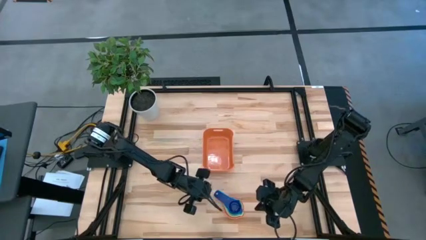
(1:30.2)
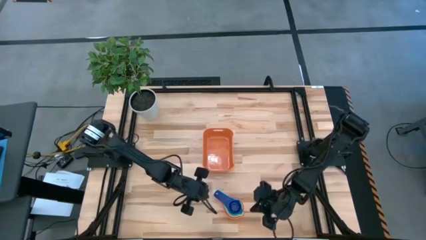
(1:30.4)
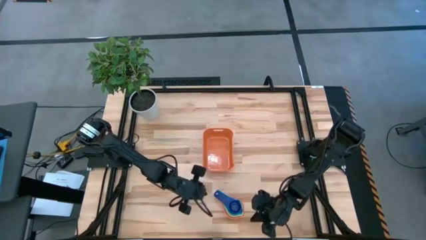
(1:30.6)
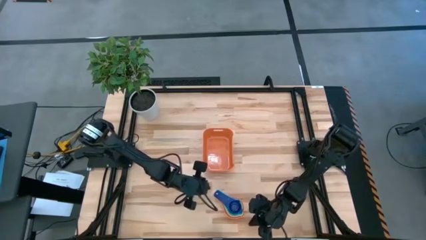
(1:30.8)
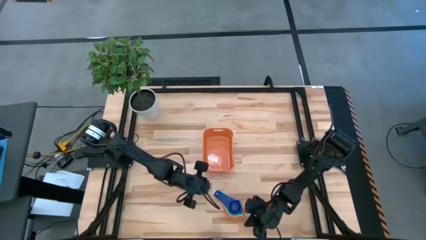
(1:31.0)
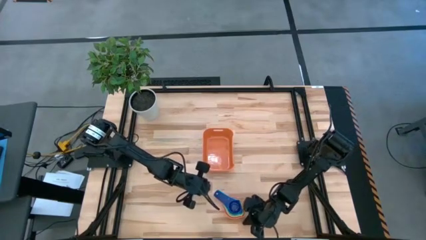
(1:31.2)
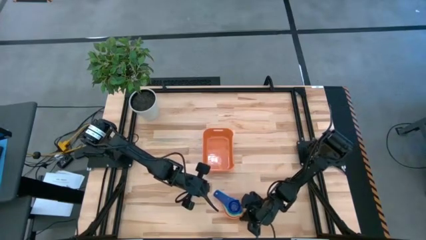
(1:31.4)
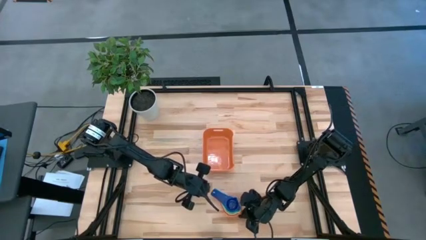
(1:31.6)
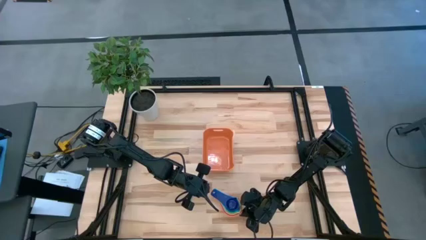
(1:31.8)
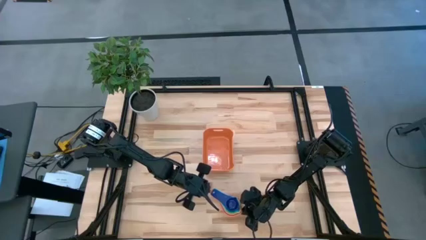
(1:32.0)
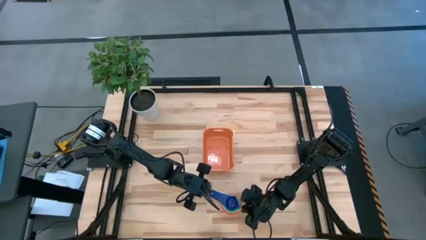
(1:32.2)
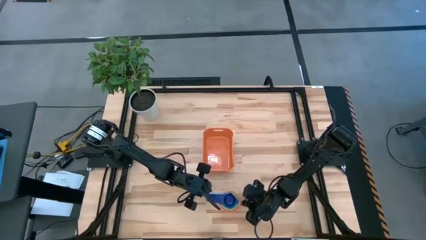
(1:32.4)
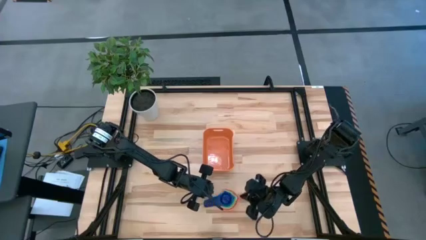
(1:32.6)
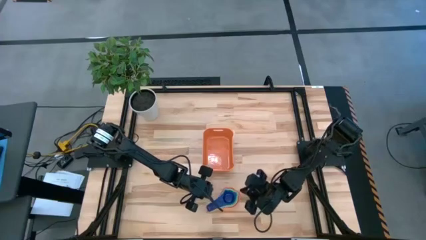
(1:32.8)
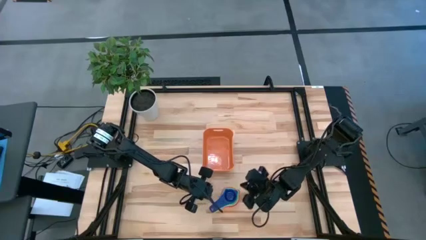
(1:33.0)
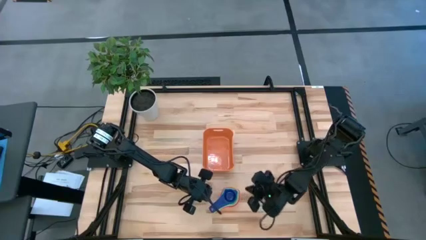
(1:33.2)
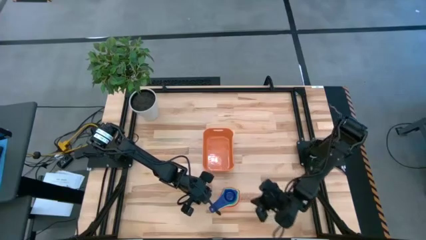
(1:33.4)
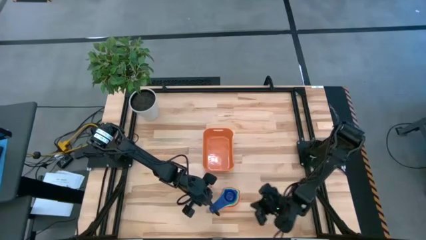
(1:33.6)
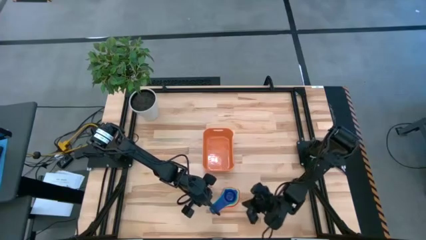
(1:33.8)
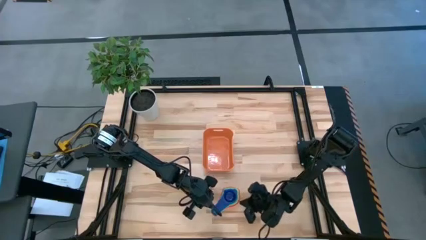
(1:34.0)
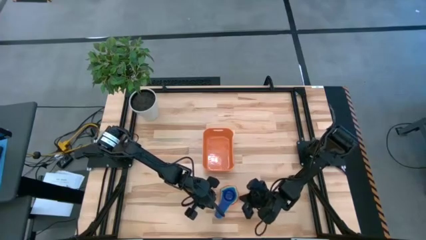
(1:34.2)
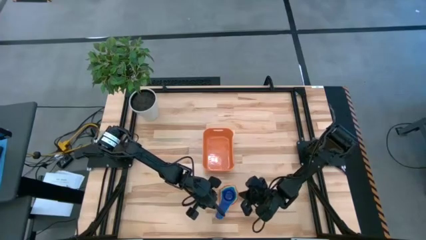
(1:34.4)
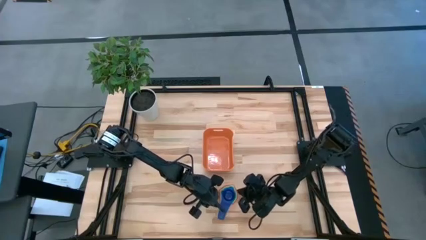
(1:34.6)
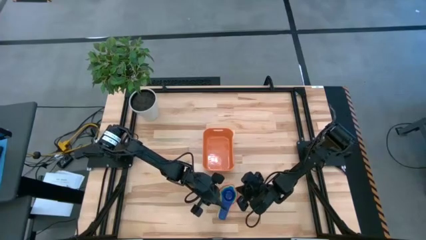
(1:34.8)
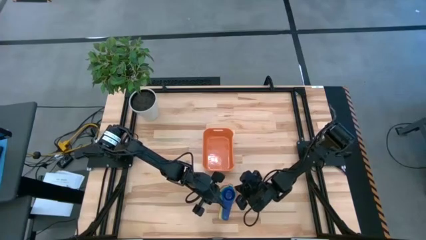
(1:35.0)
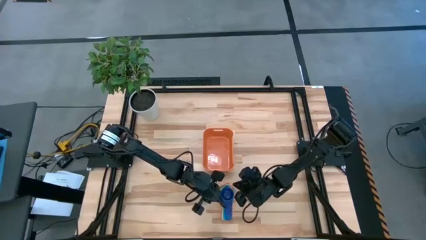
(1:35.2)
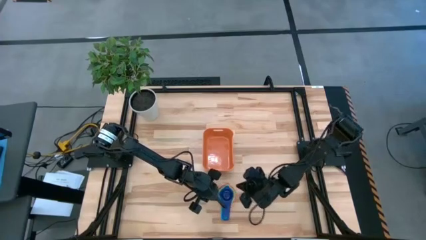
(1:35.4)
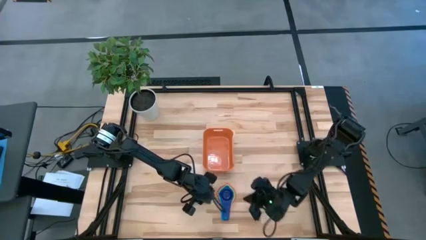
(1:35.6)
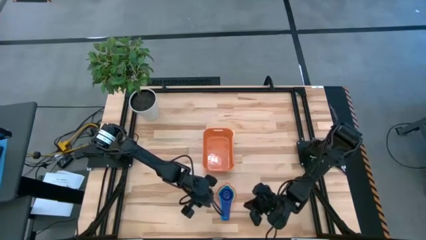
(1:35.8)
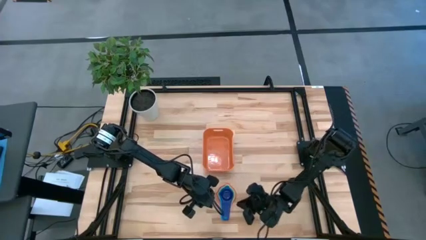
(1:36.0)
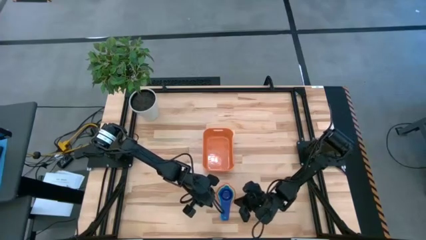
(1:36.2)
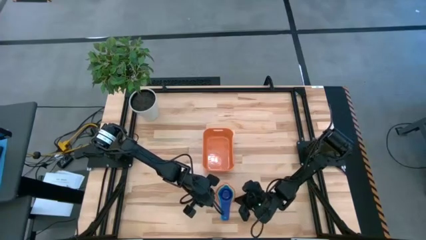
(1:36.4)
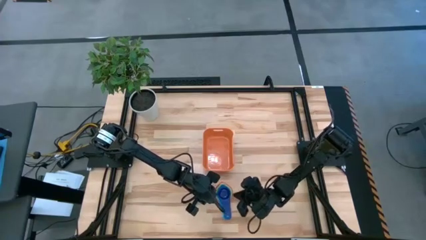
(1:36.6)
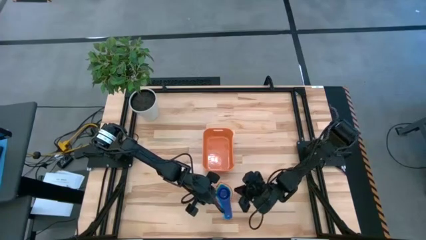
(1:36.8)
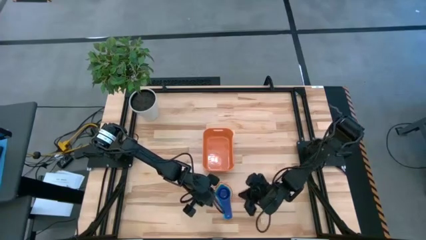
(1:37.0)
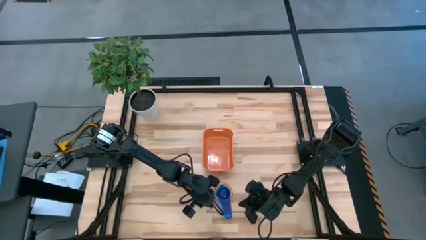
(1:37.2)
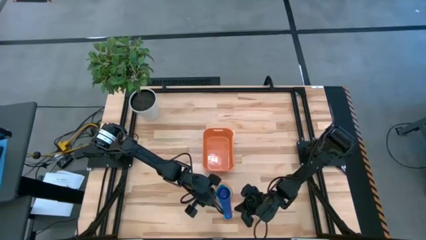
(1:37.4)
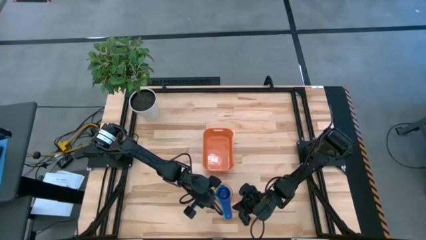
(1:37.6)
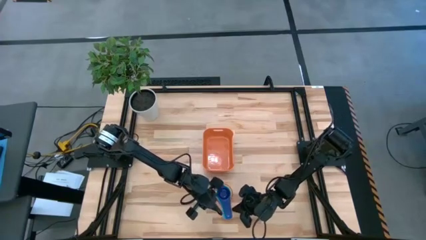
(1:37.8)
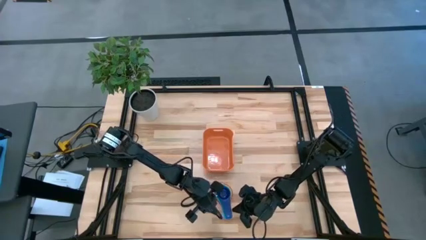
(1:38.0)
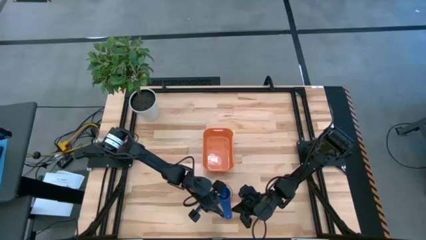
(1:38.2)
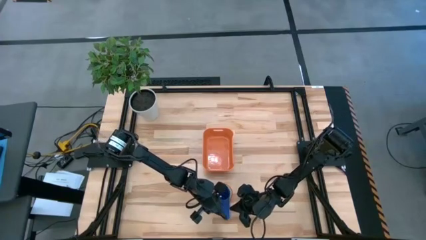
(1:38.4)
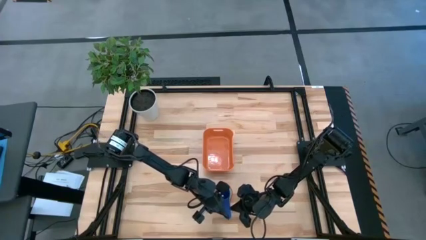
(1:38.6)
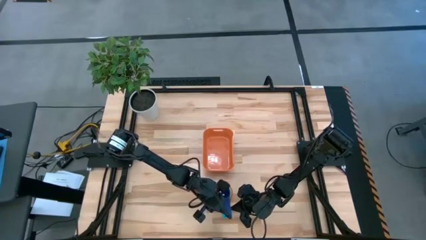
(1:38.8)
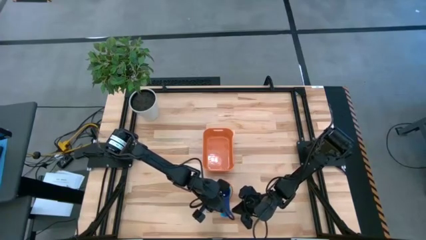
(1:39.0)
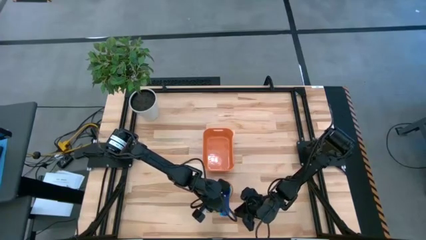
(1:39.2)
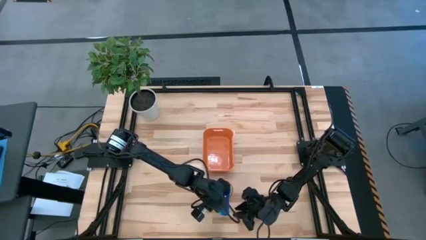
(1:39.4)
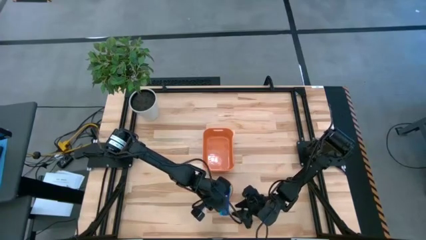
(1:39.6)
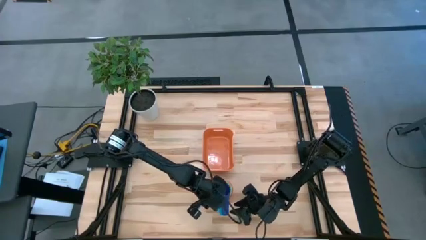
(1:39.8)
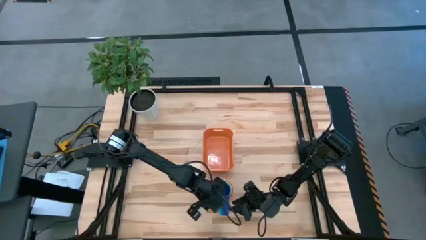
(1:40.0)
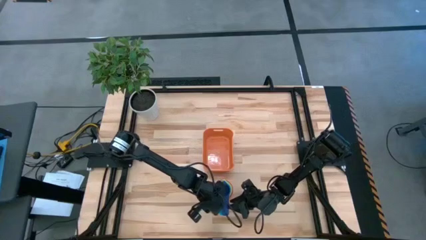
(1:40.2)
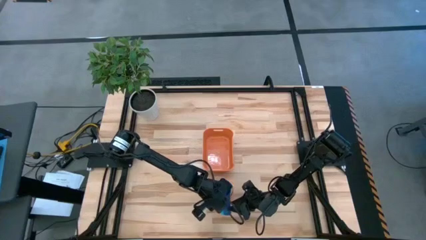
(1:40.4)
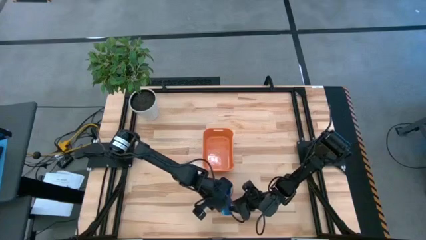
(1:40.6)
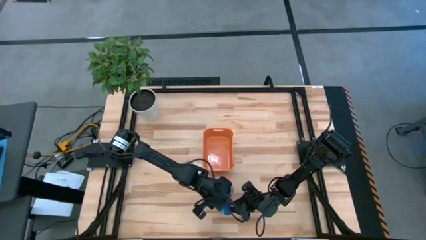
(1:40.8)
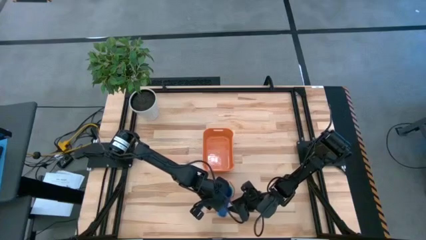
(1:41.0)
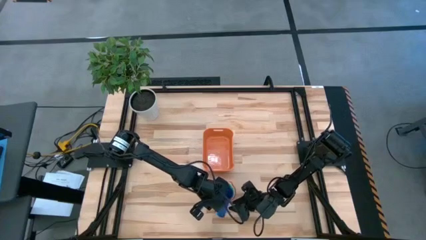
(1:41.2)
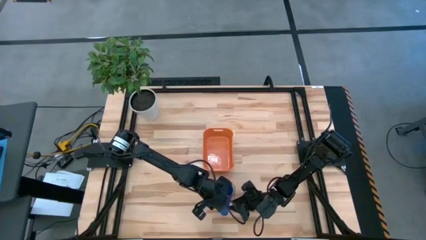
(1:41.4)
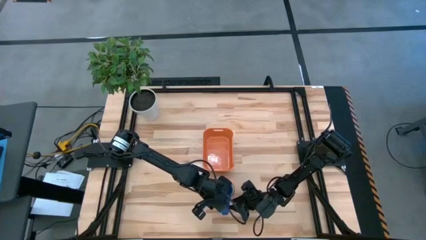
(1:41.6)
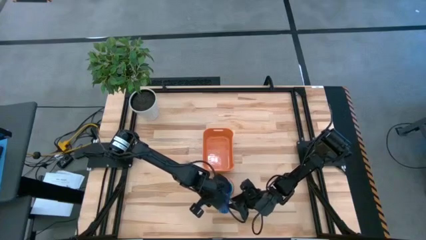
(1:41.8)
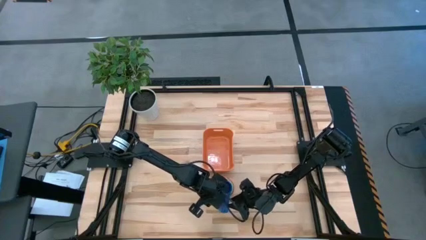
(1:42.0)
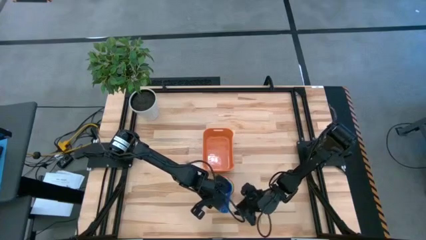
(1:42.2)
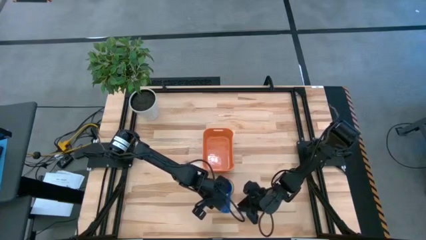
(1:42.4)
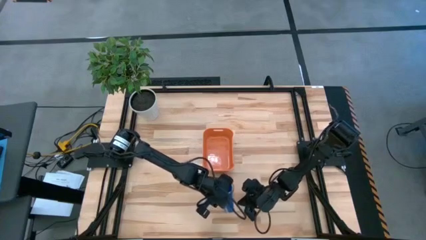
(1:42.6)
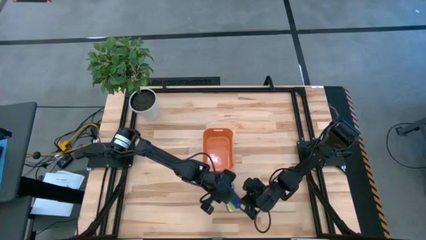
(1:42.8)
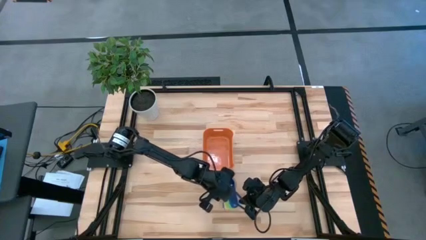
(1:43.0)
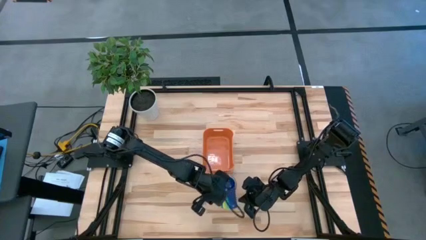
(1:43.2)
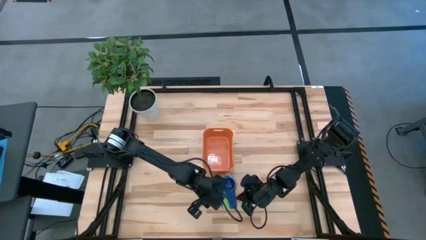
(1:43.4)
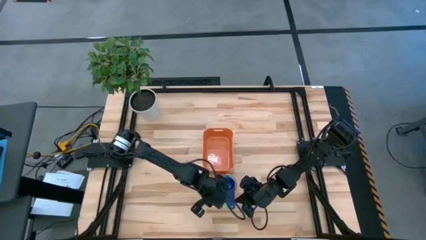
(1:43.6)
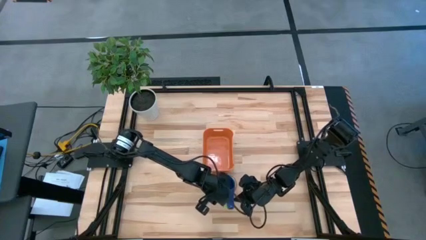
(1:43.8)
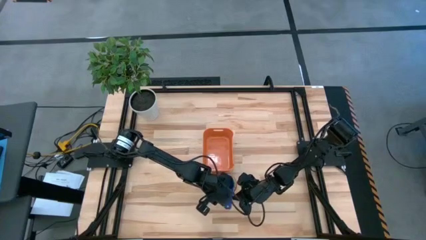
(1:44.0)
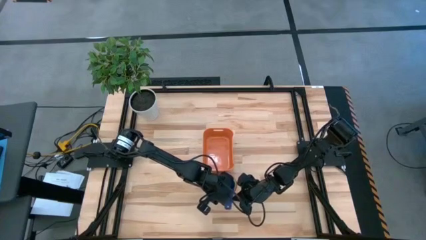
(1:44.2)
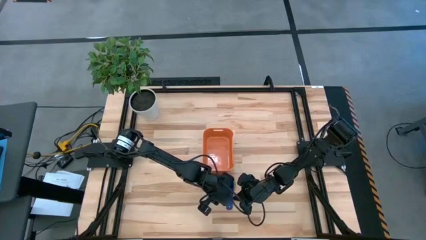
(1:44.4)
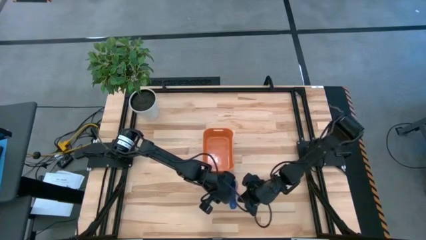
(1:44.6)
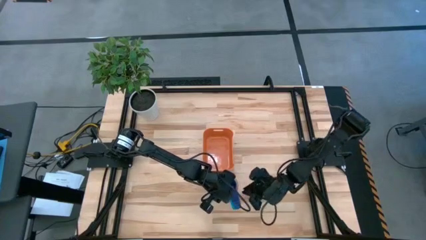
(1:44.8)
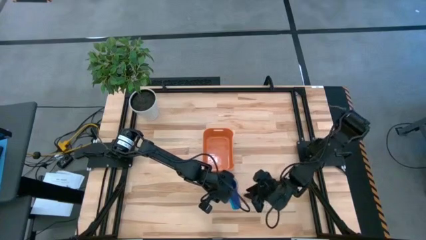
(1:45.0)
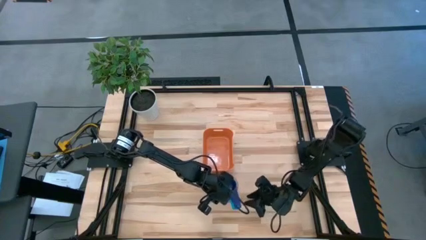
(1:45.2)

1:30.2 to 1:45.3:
Task: Nest measuring cups in basket
Put the stacked measuring cups into the orange bin

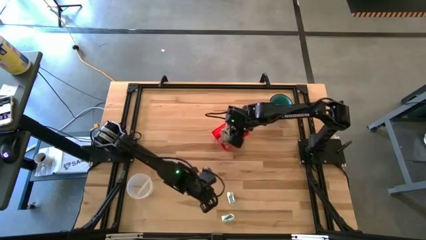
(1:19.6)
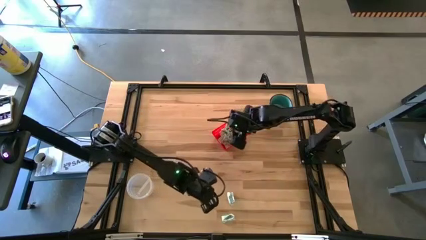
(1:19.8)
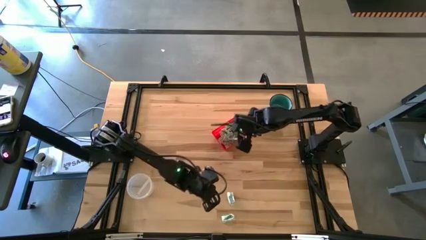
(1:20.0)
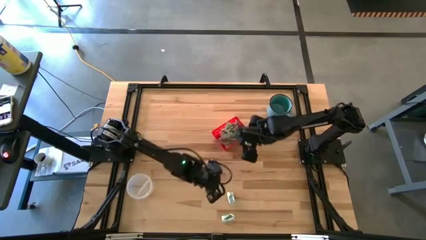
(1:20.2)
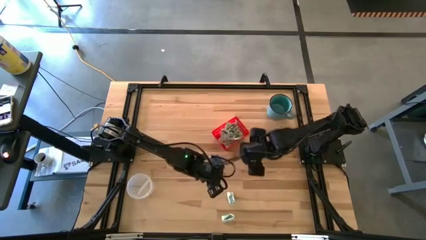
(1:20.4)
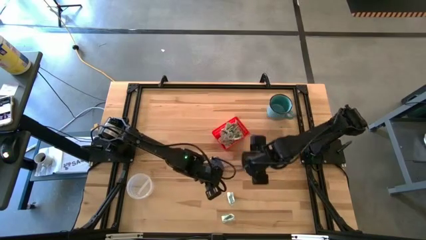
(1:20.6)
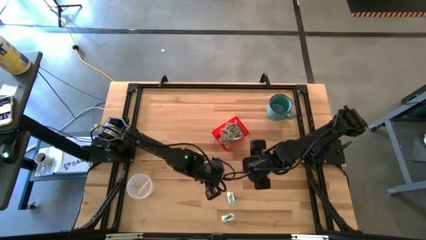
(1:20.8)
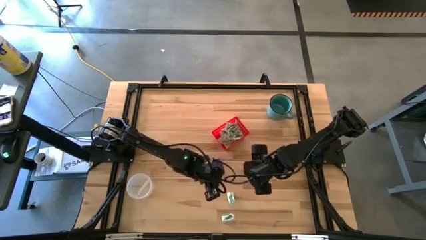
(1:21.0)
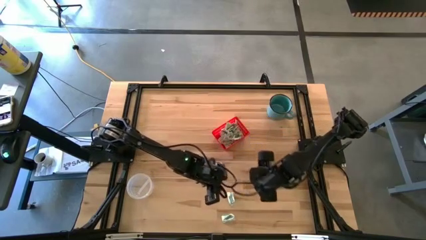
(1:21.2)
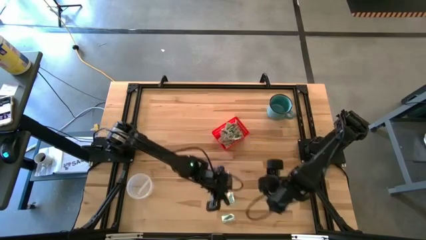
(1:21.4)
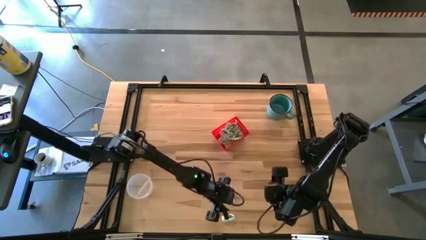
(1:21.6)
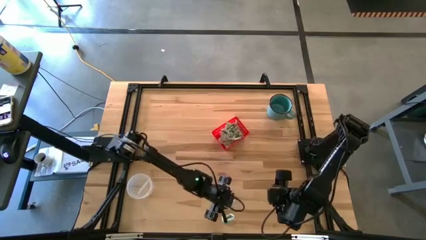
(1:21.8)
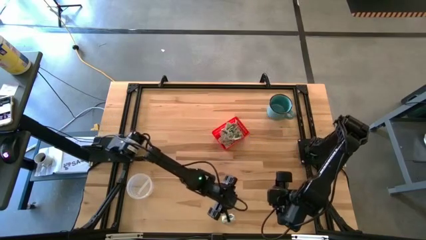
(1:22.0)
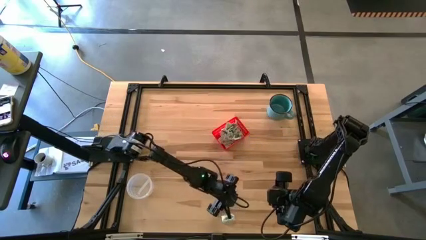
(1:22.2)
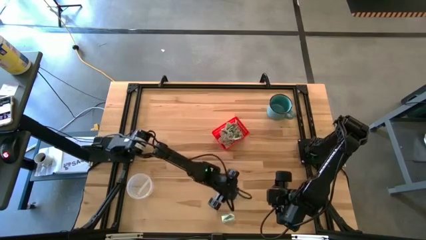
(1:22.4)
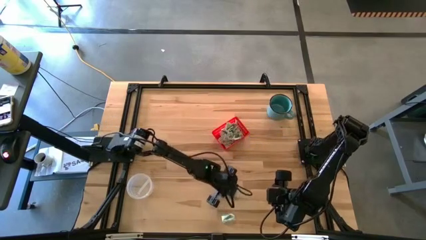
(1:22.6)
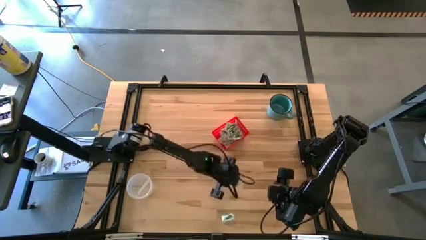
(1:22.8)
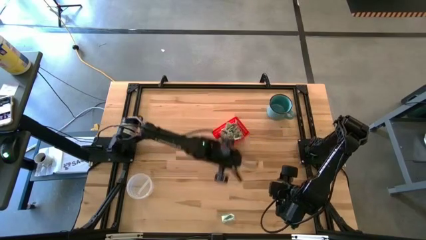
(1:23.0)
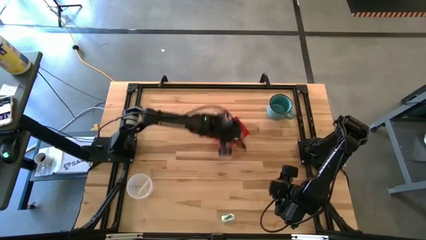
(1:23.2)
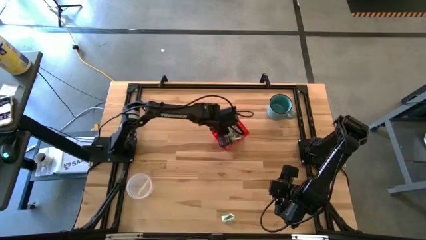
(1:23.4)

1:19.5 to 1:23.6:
Task: Pick and place items into bin
Put the stevia packet into the red bin
